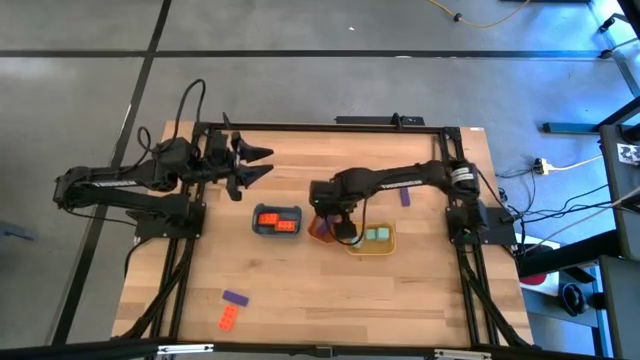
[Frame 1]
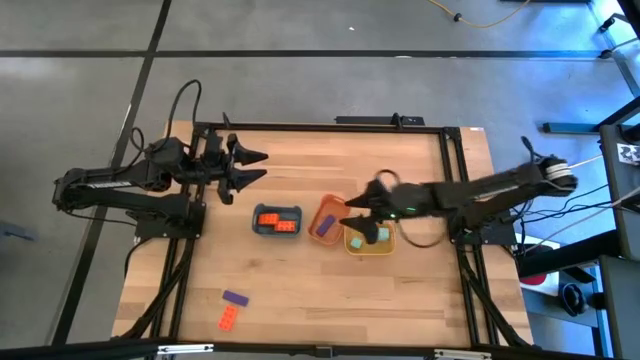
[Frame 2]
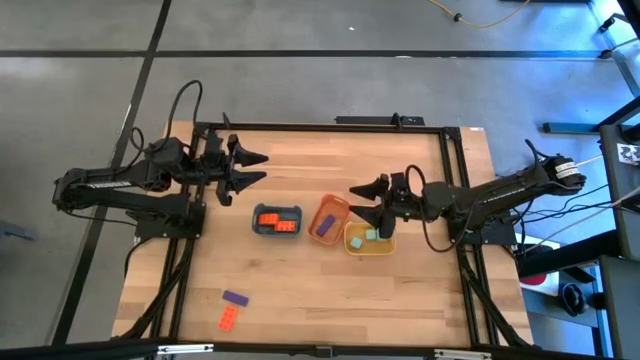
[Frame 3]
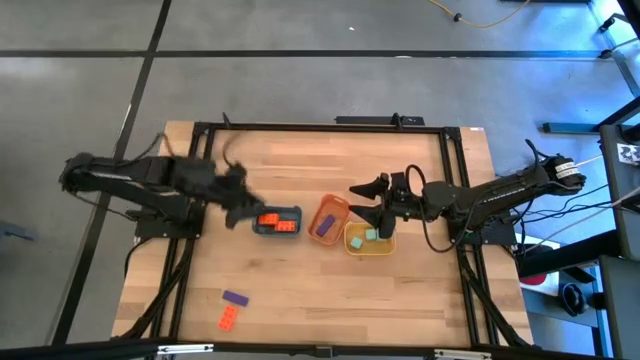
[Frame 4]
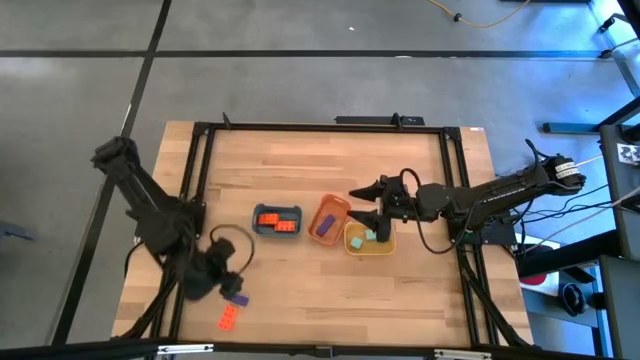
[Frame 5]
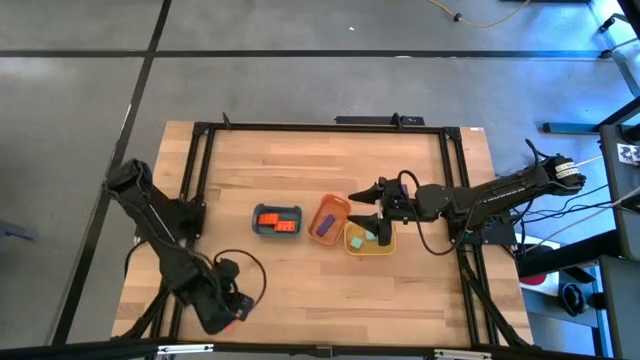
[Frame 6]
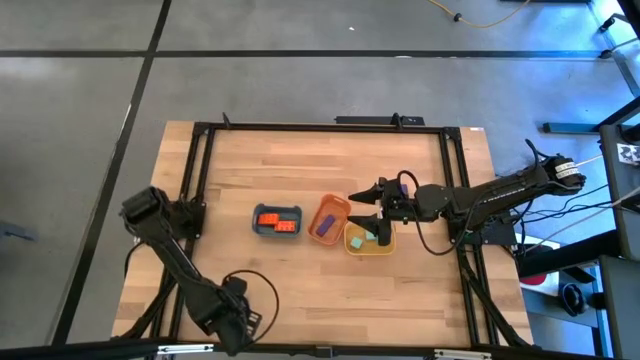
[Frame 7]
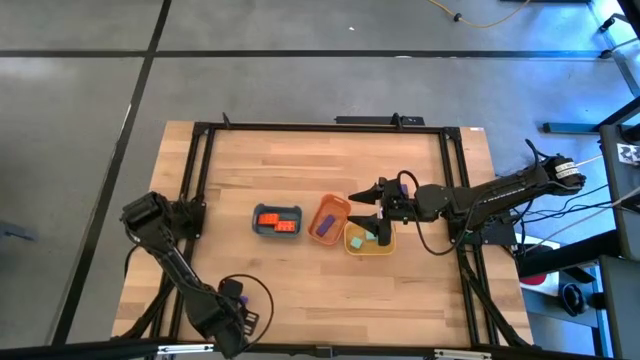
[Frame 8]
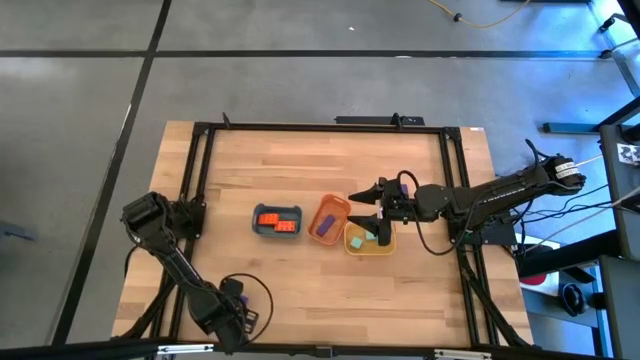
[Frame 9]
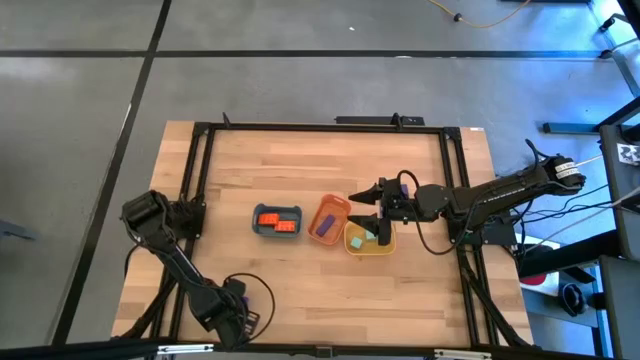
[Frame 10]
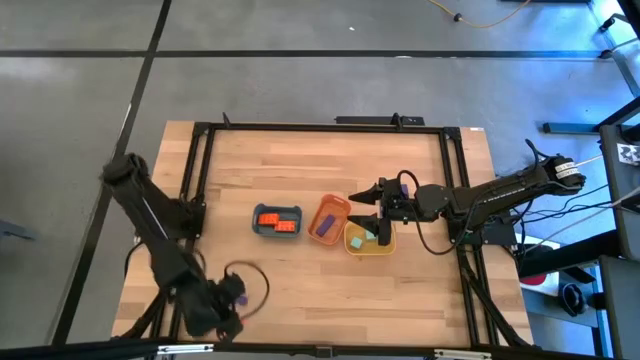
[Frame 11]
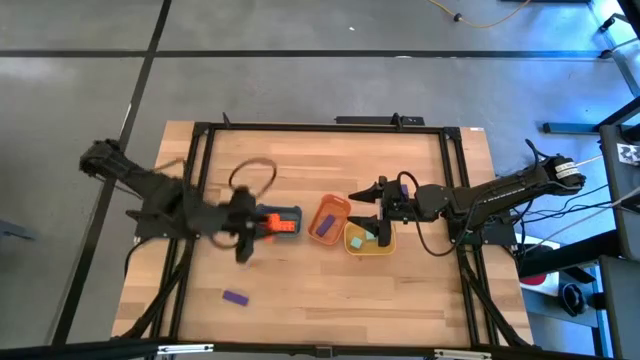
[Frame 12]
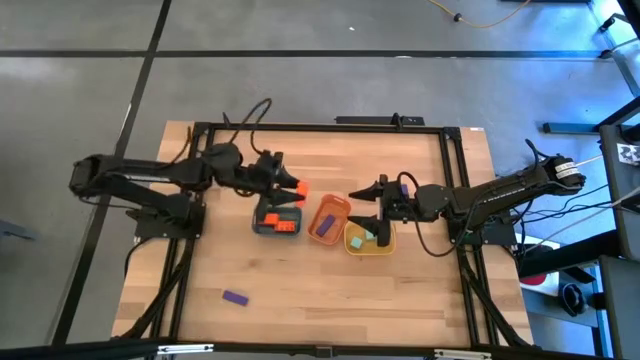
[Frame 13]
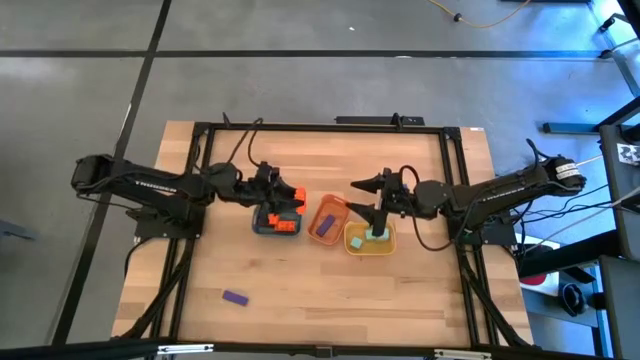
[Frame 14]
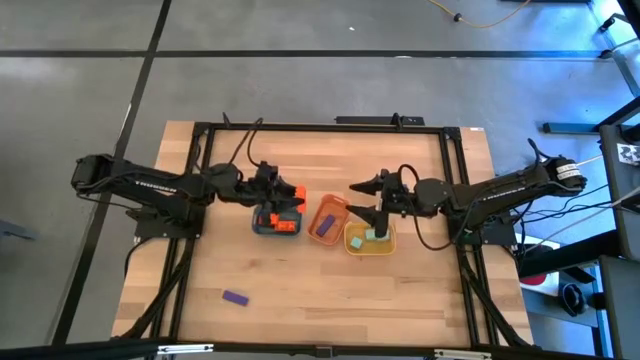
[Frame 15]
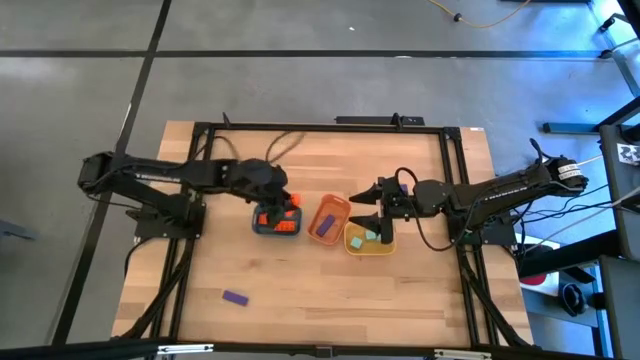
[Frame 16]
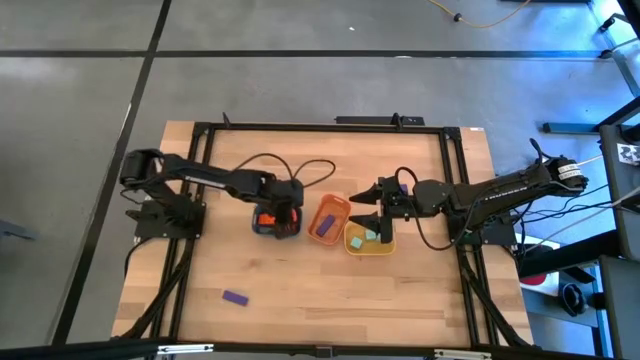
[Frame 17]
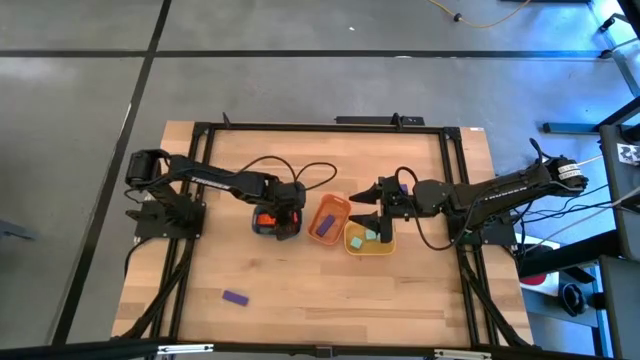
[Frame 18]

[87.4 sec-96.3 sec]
Task: Sort & place blocks by color
Put the orange rectangular block into the blue bin

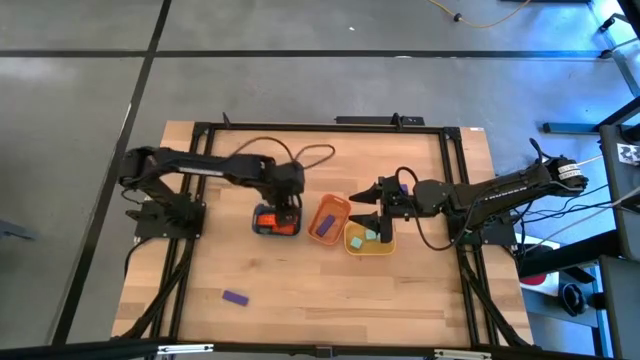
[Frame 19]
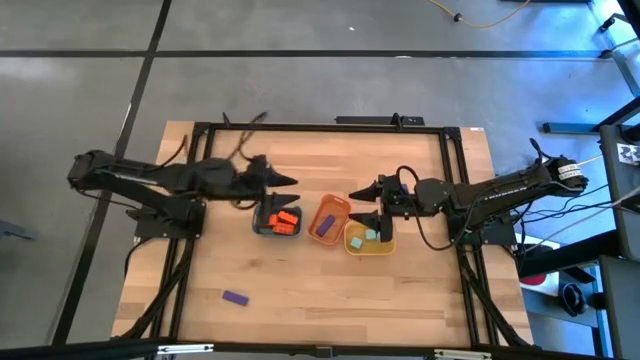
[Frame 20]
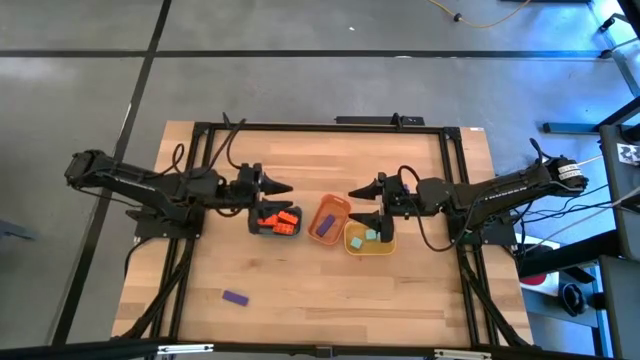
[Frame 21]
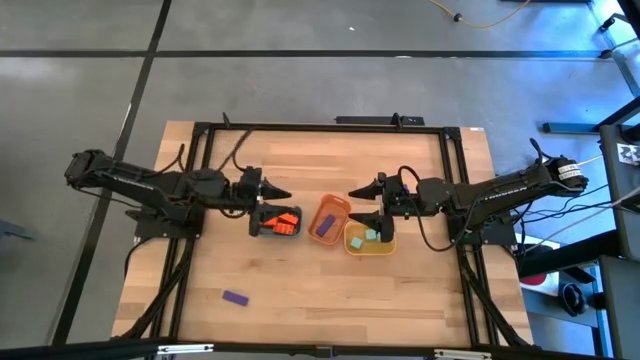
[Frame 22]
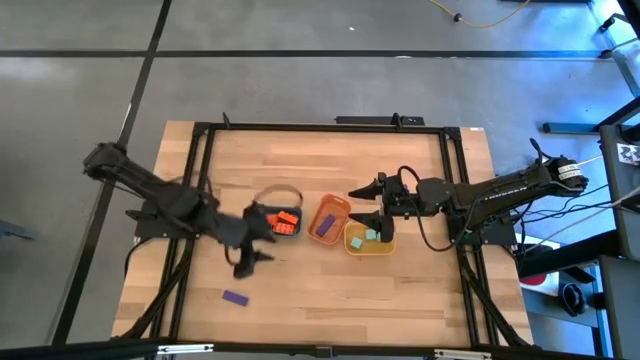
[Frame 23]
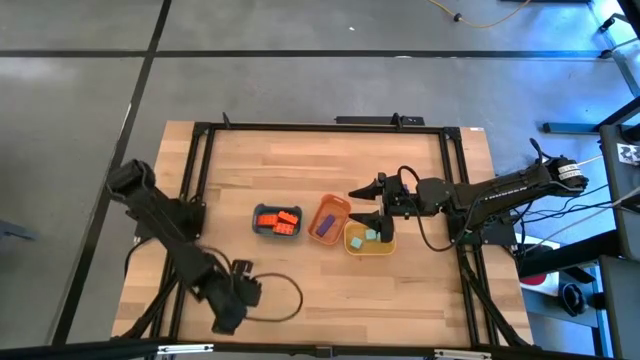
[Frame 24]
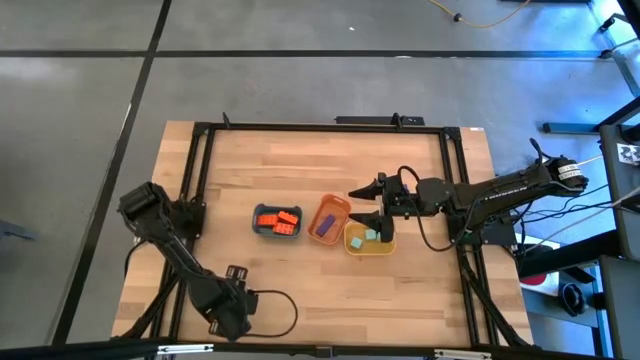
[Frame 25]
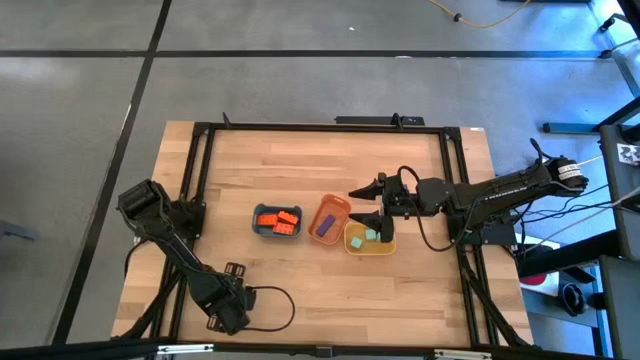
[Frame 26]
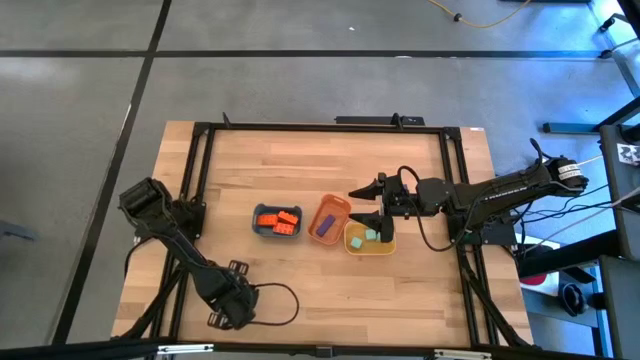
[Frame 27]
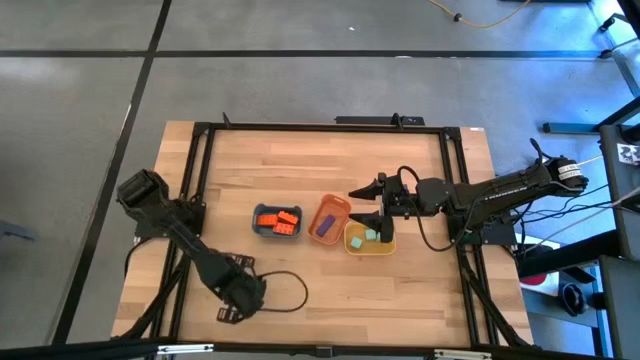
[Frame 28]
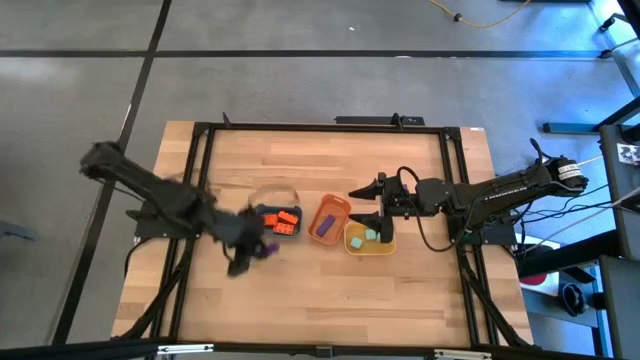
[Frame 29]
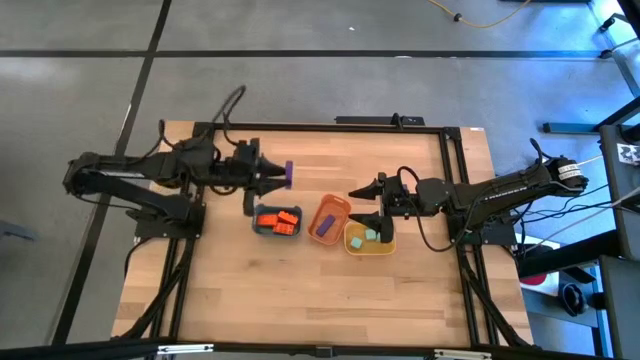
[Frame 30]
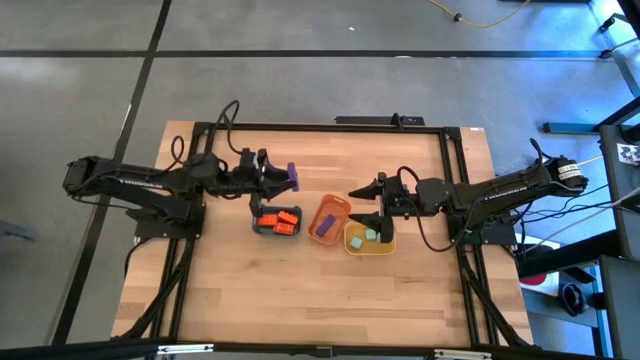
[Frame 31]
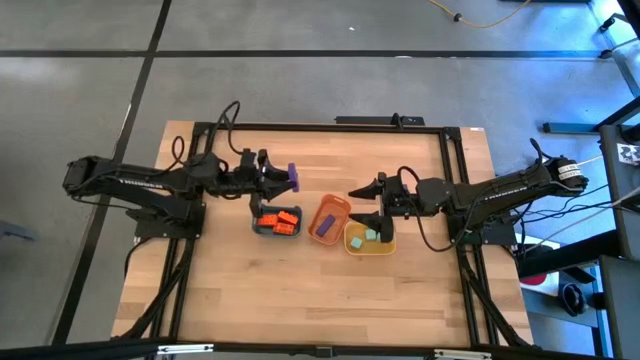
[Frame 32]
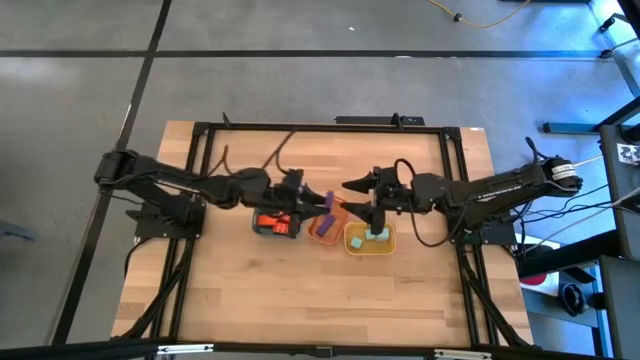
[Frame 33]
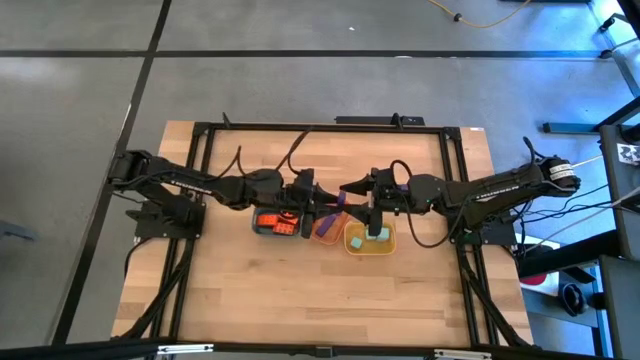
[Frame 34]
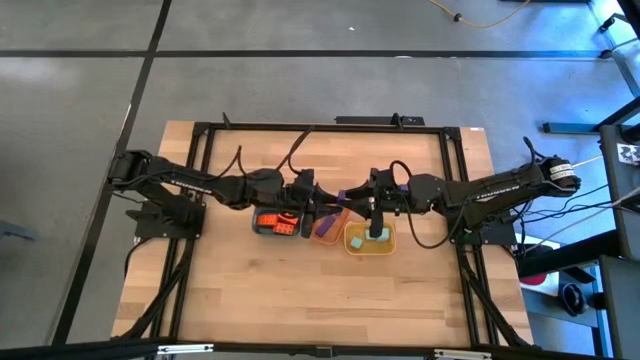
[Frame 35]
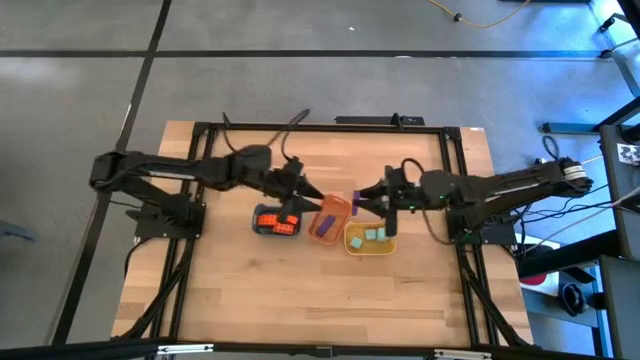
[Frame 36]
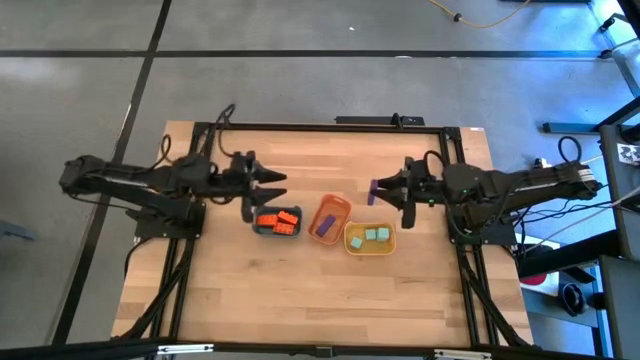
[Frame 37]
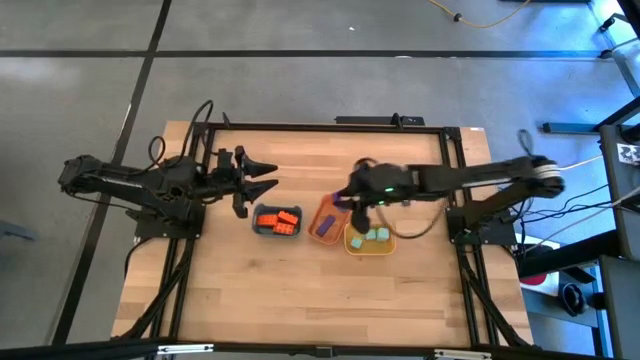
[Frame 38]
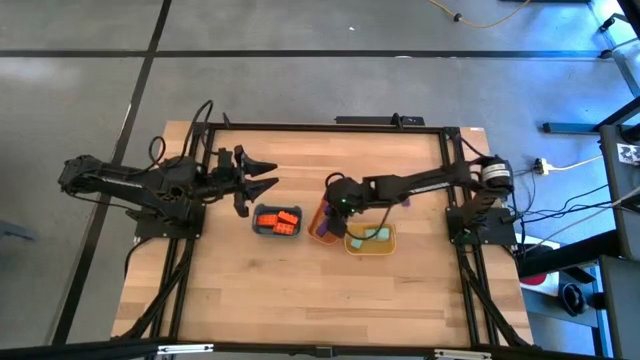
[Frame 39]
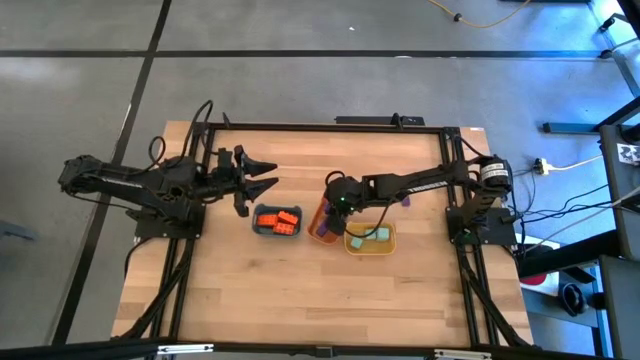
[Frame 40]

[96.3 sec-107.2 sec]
Put the bottom purple rectangular block into the orange bin

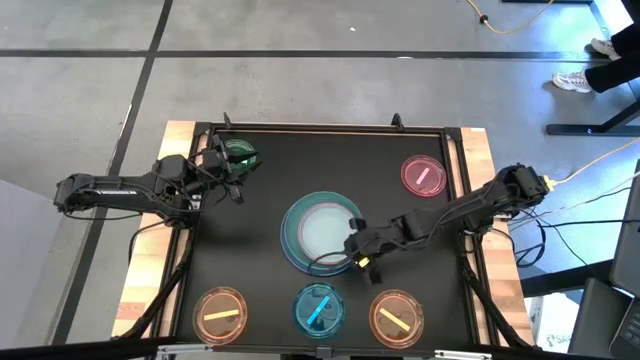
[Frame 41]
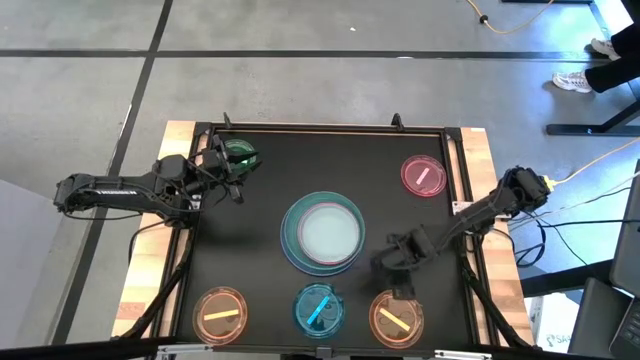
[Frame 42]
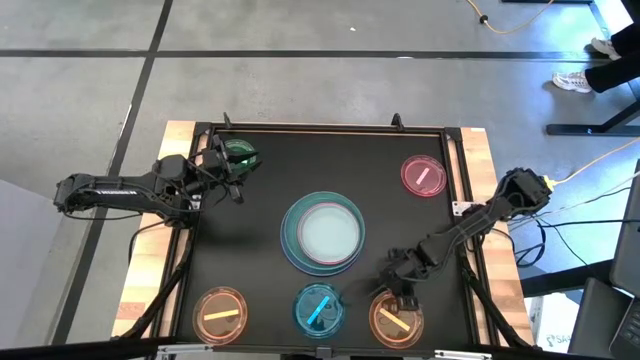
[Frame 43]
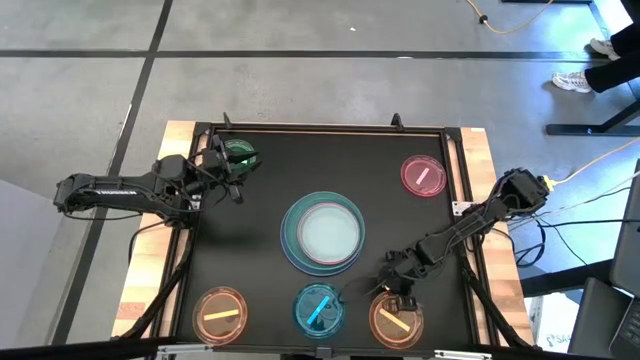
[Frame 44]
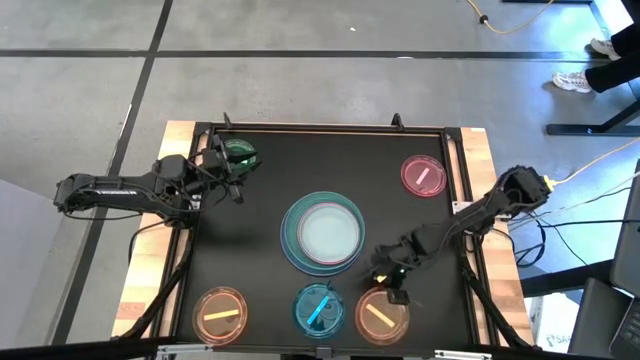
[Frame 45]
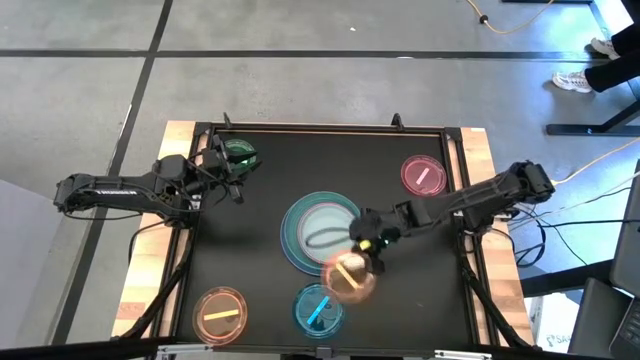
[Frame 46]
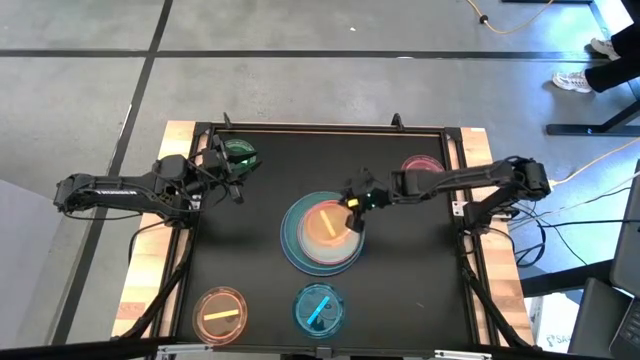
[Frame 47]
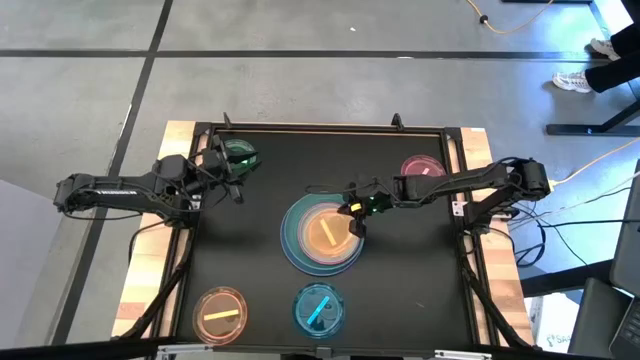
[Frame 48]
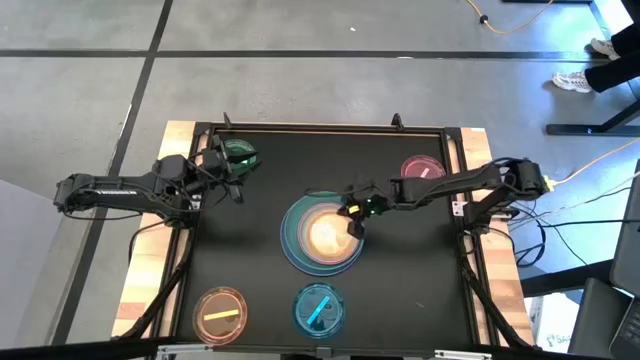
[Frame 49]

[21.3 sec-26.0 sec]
Task: Stack plastic plates
Stack the left orange plate on top of the gray plate
